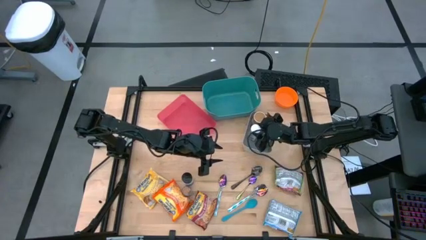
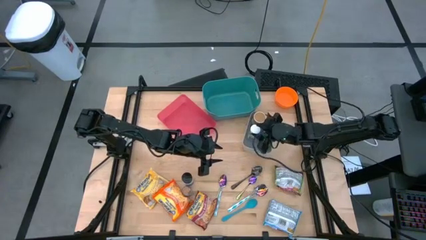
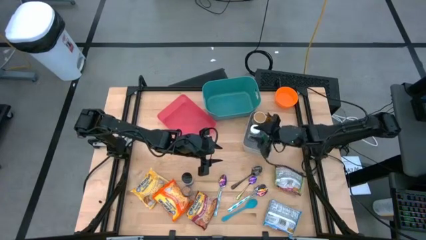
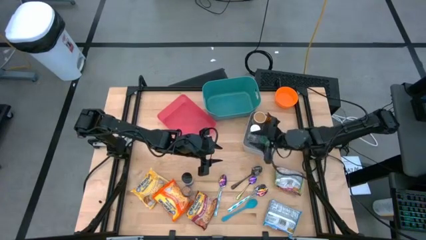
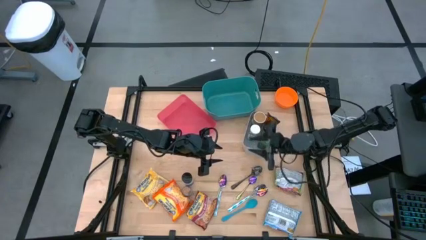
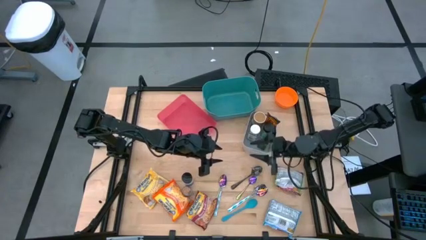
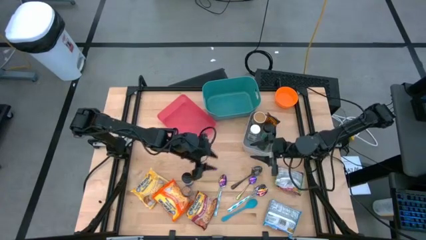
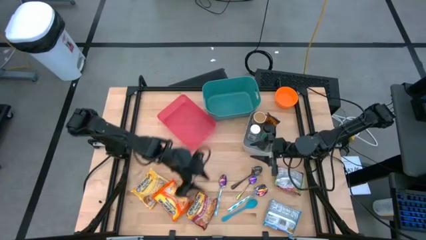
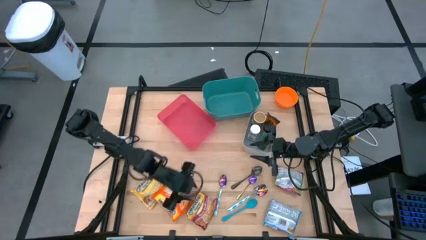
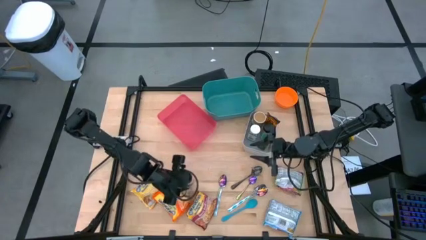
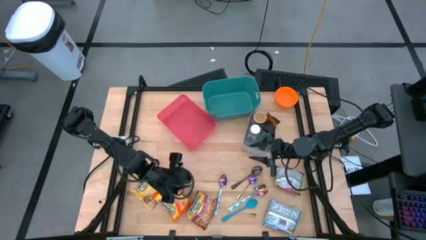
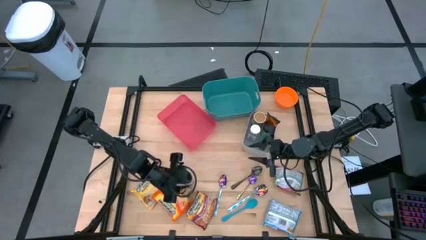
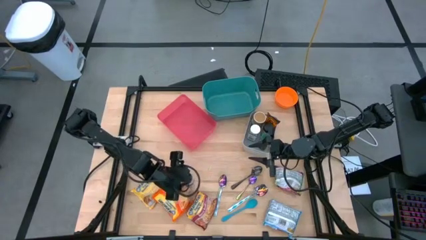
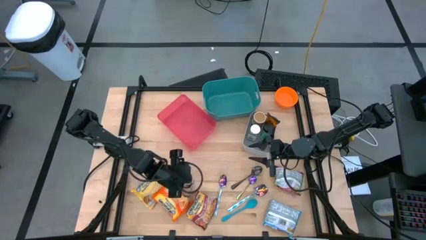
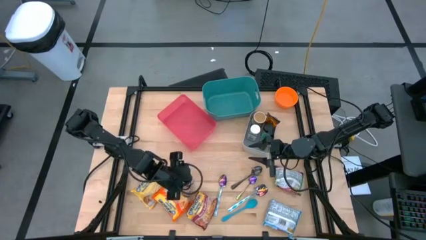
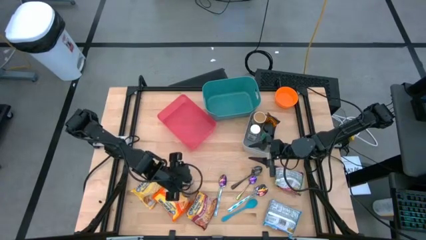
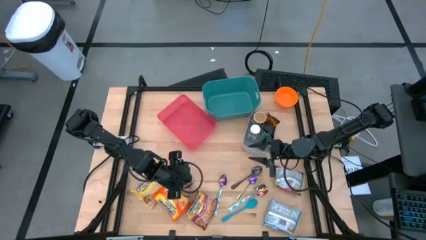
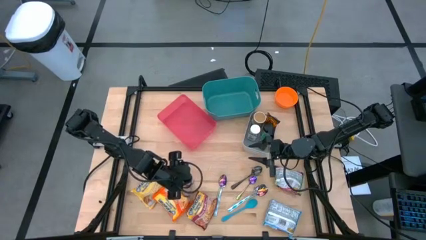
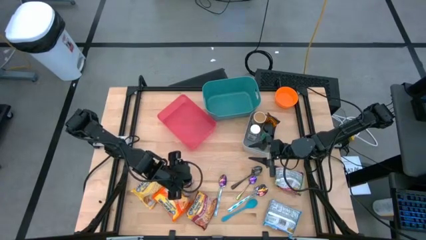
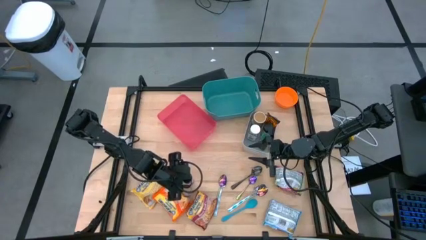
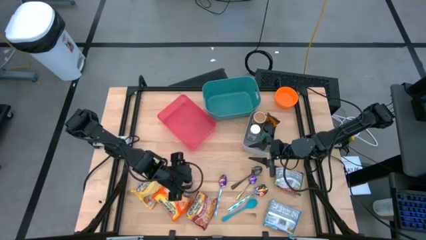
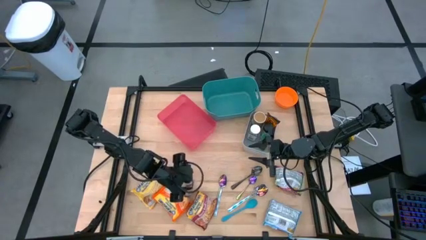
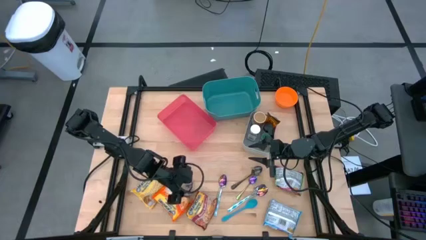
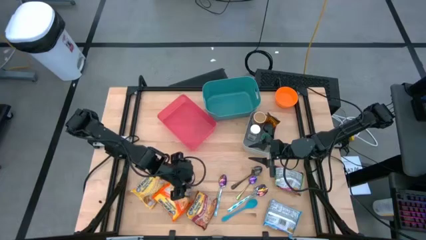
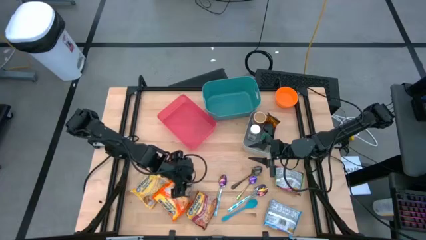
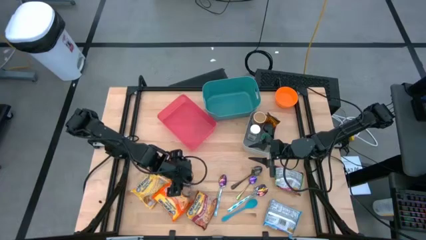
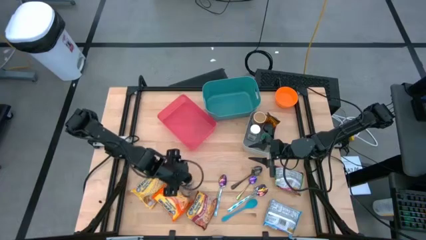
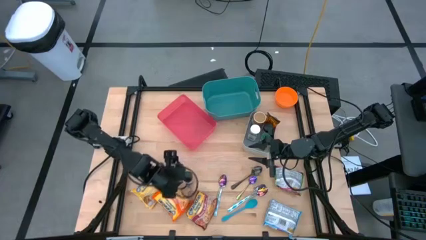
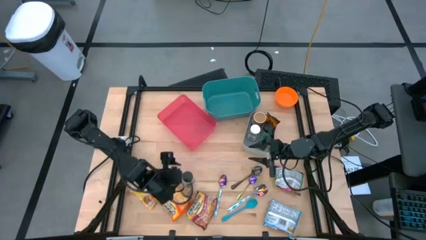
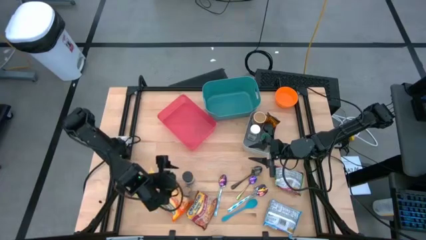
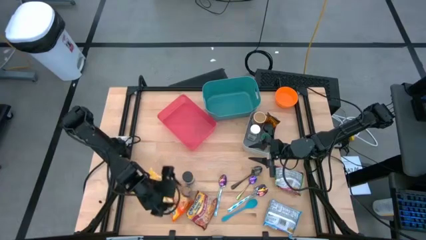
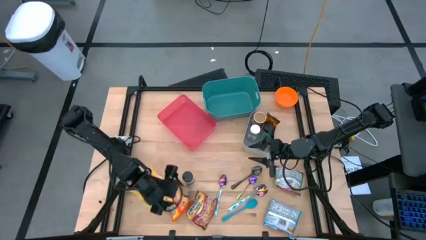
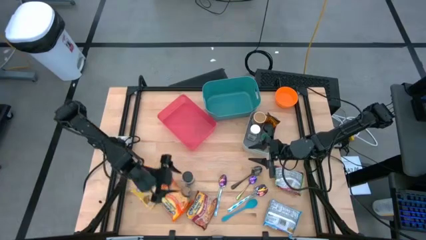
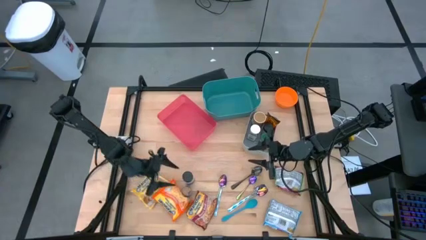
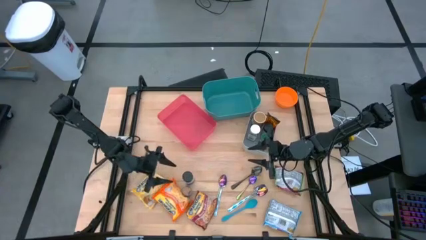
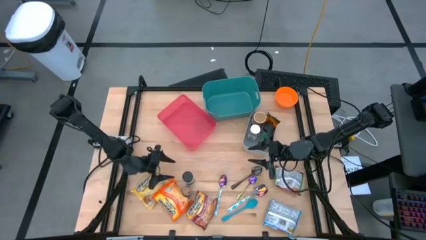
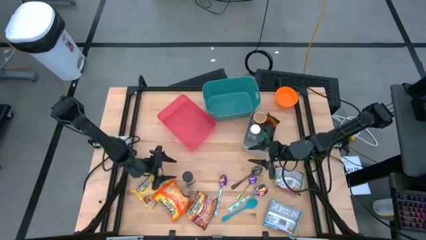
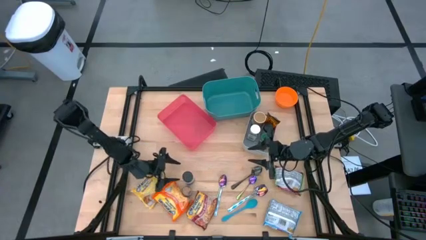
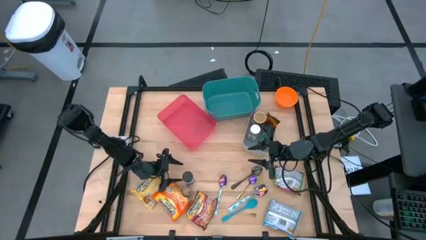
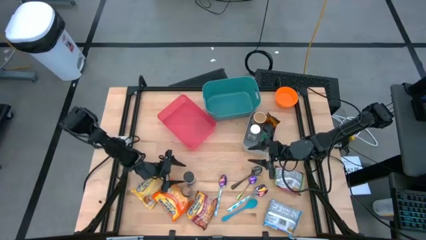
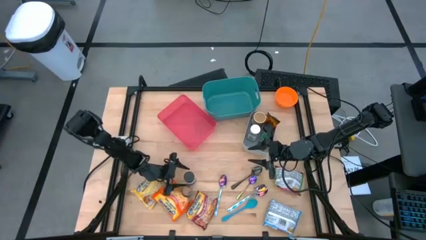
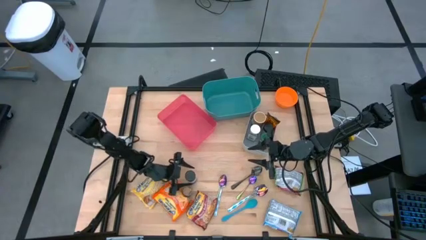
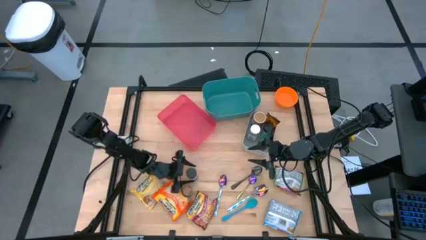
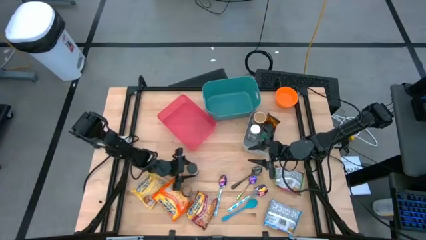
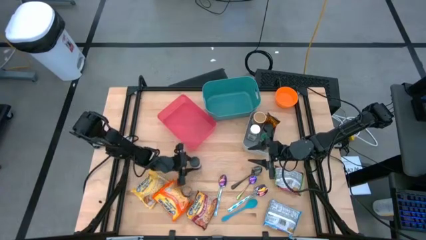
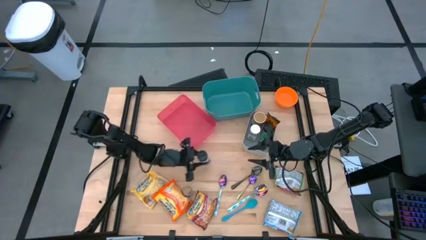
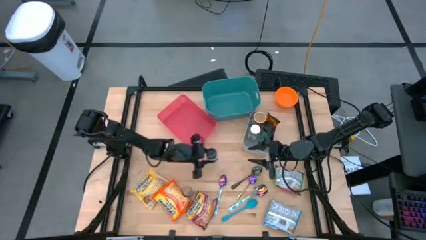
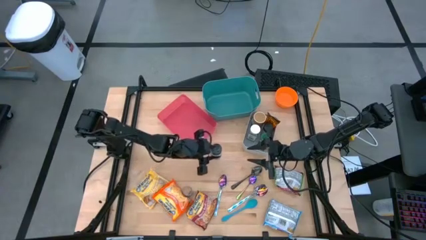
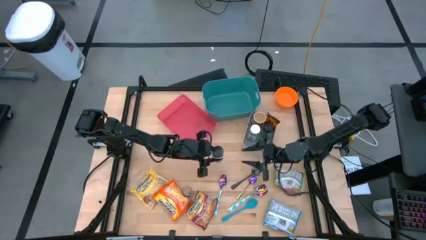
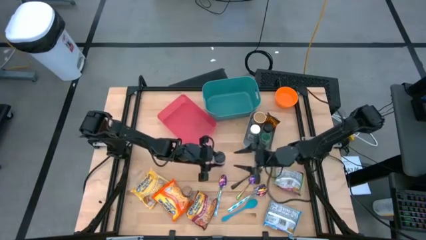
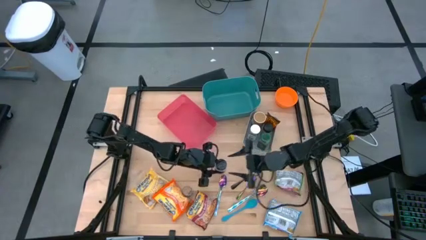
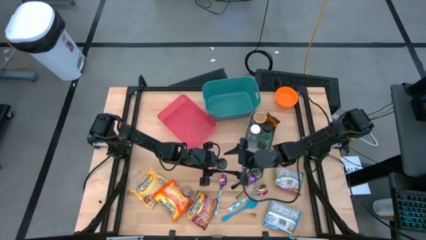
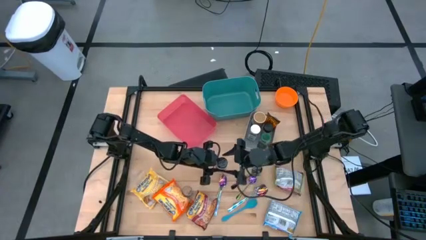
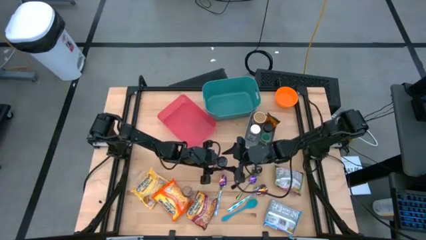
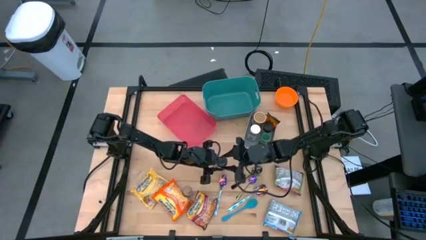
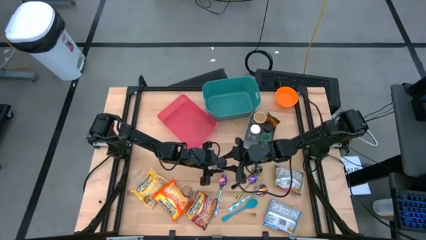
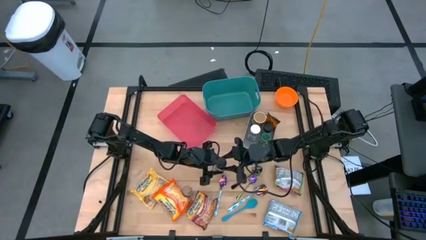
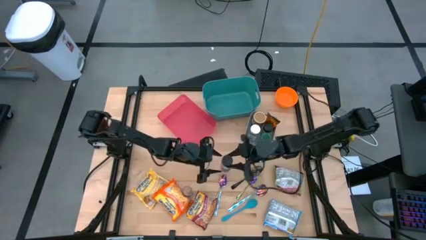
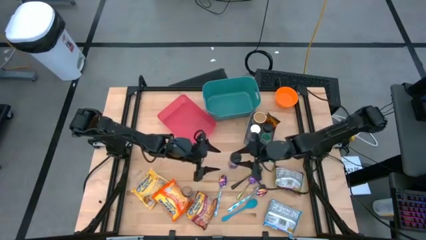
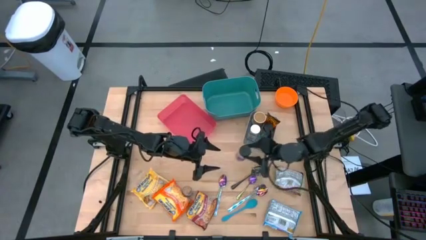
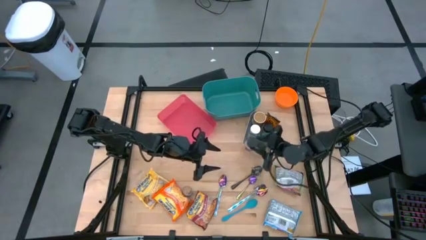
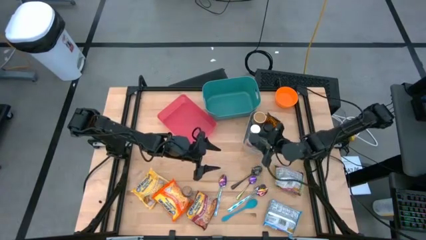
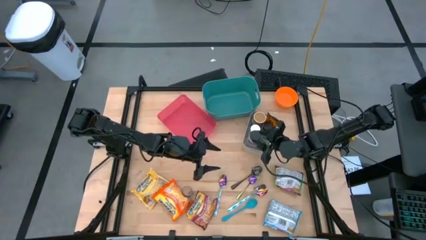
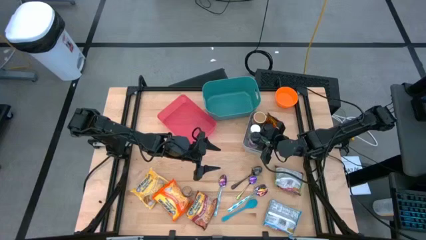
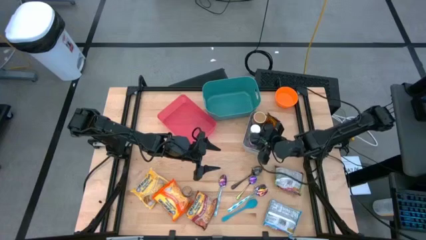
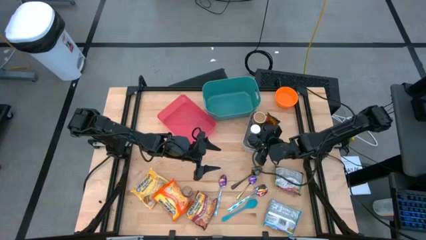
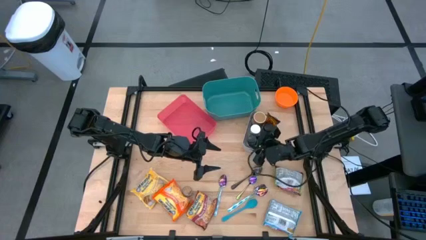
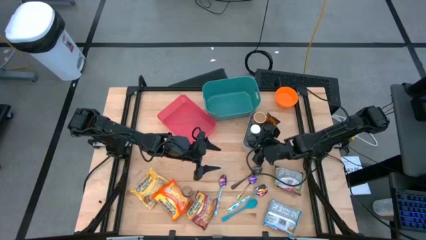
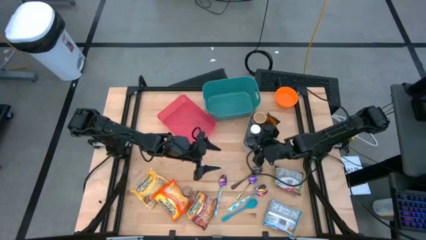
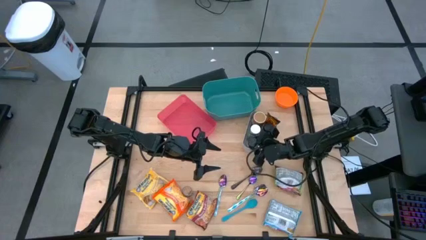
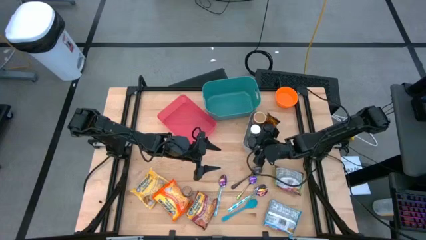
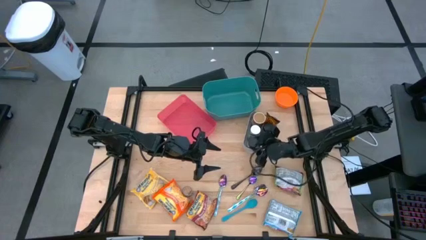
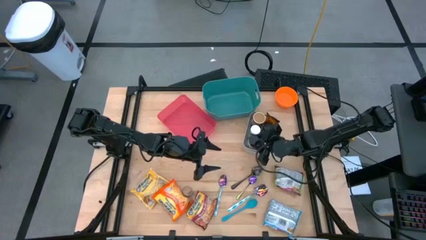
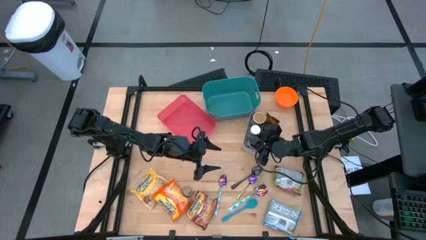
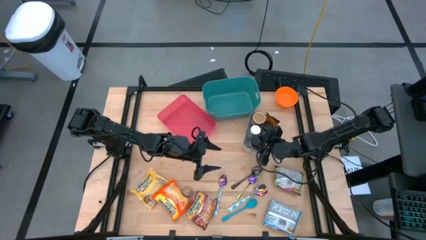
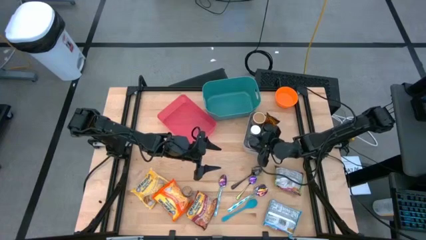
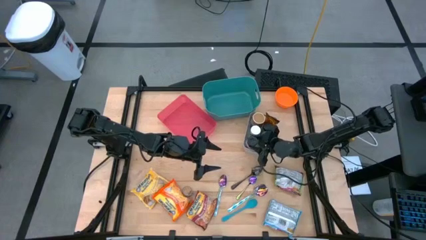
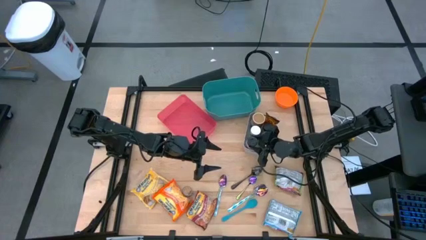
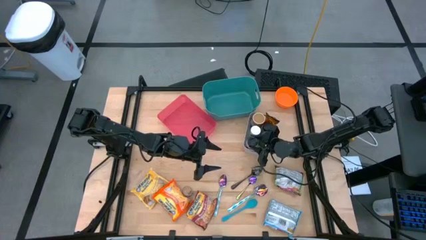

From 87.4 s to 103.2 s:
Task: Pick & Place Food Item
Put the black spice bottle into the gray bin

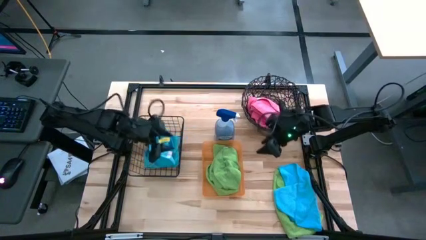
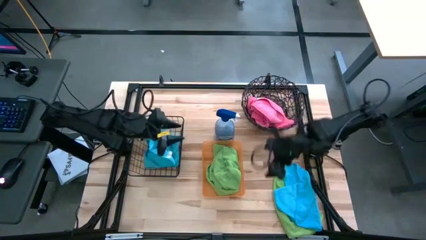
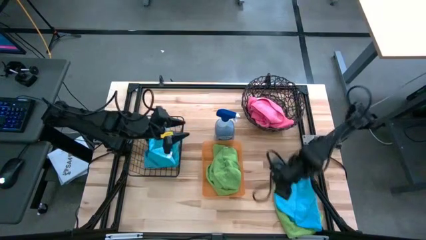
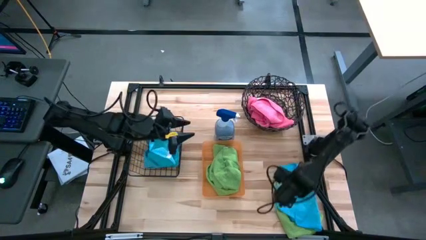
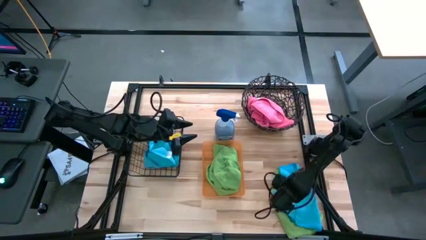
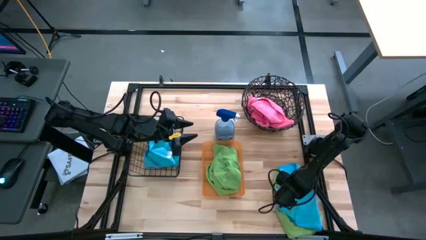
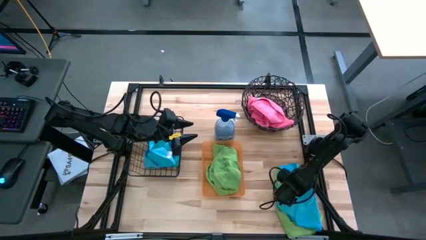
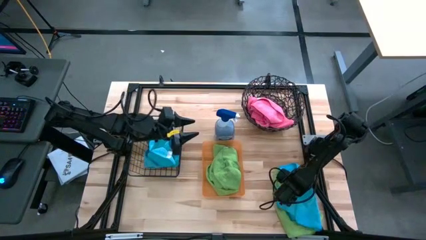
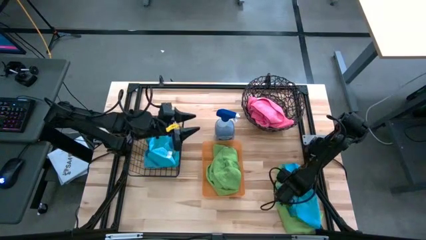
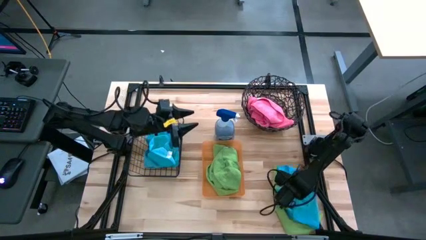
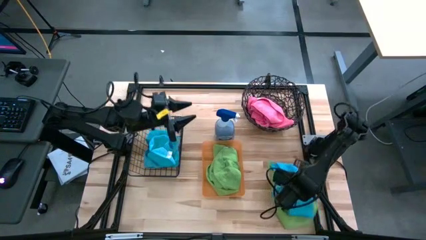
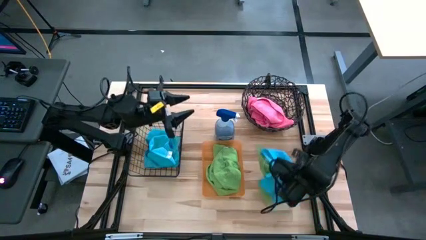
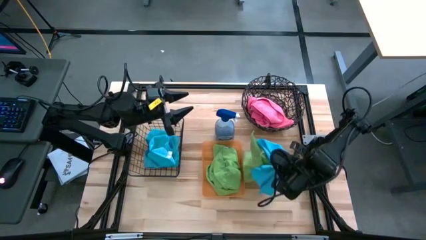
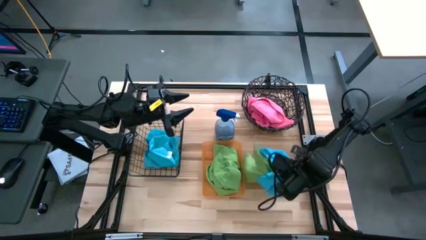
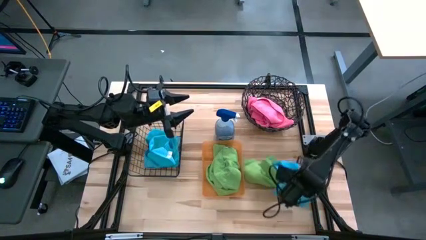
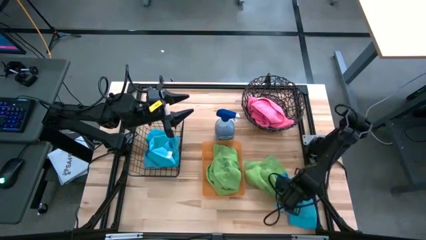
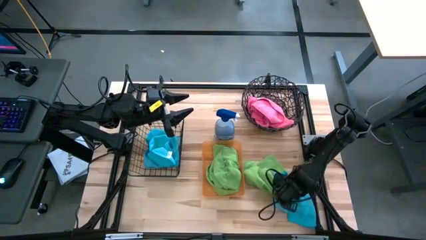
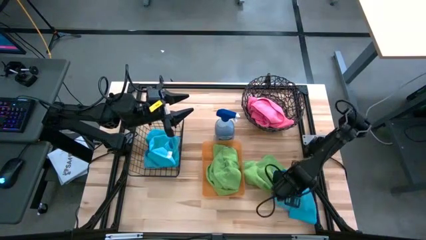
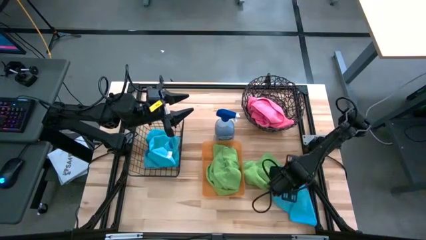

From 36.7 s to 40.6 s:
Task: Sort microfiber towel by color & place in baskets
Put the blue microfiber cloth into the wire basket
